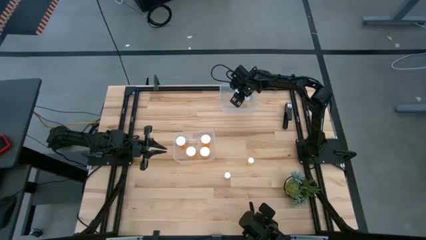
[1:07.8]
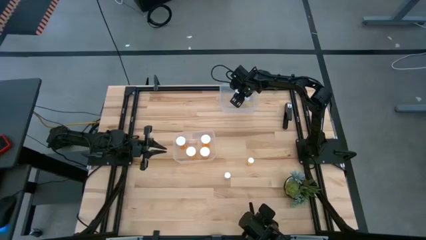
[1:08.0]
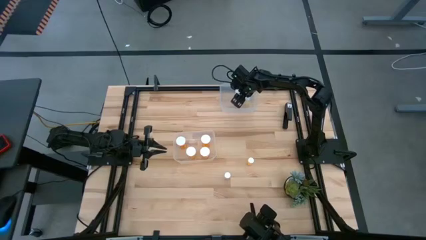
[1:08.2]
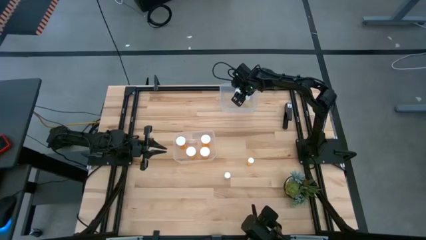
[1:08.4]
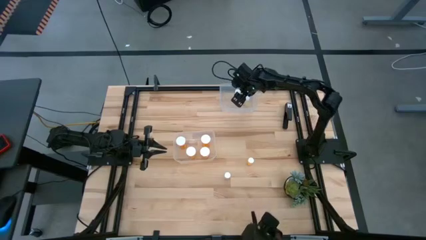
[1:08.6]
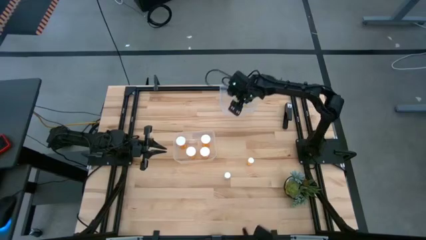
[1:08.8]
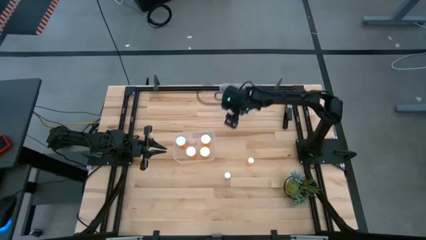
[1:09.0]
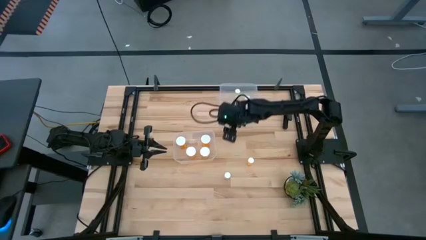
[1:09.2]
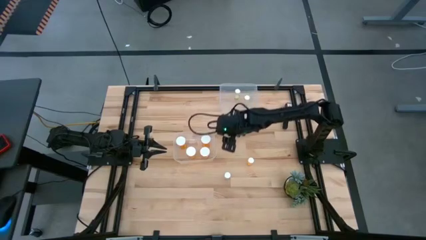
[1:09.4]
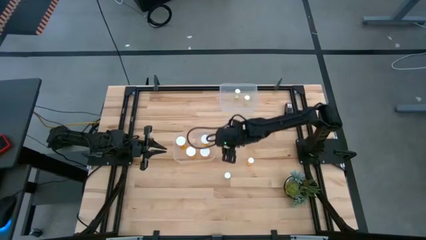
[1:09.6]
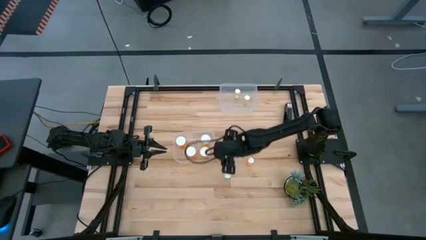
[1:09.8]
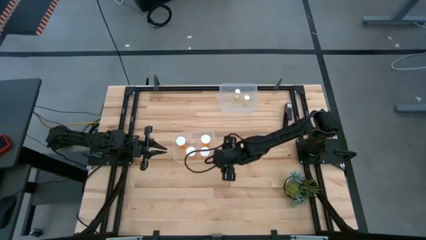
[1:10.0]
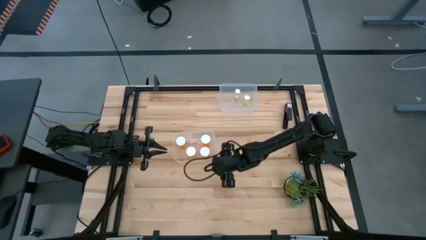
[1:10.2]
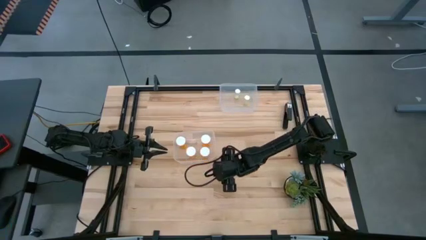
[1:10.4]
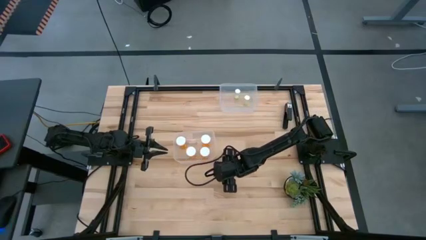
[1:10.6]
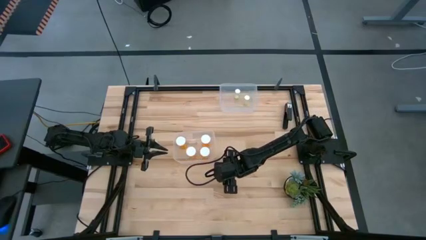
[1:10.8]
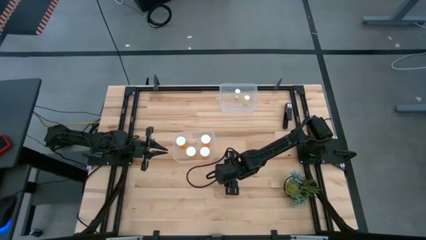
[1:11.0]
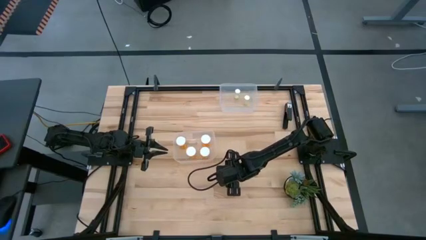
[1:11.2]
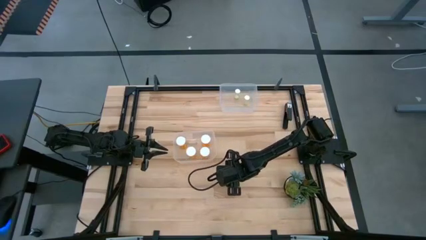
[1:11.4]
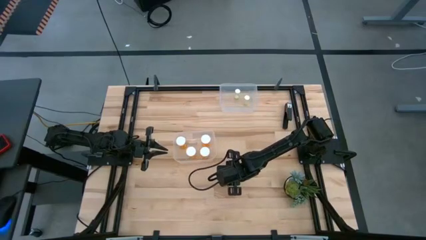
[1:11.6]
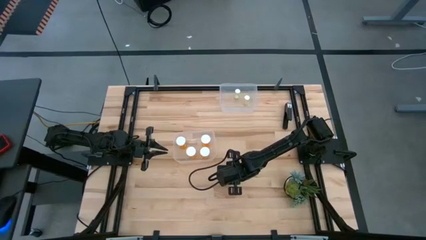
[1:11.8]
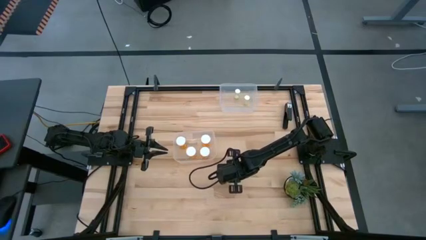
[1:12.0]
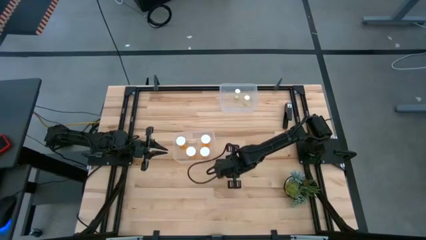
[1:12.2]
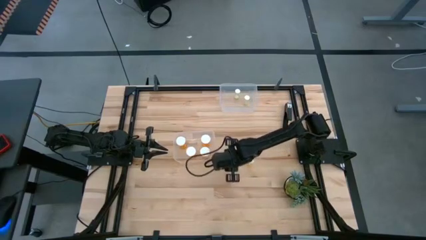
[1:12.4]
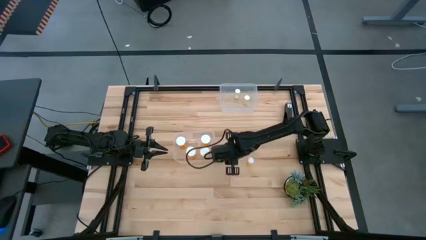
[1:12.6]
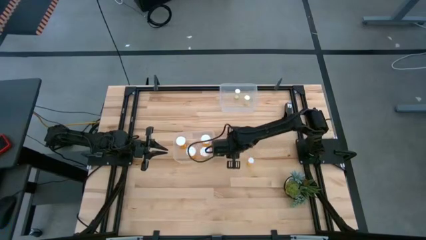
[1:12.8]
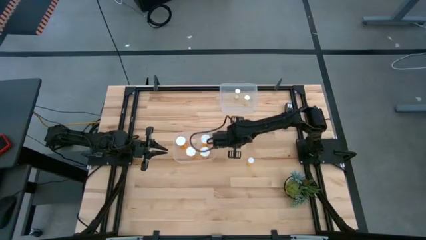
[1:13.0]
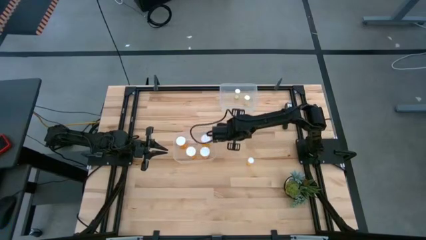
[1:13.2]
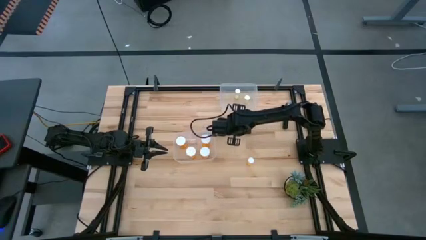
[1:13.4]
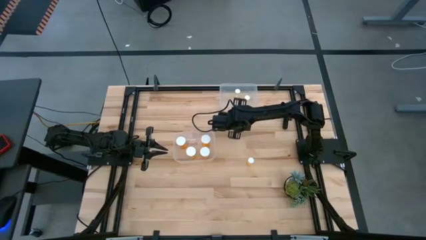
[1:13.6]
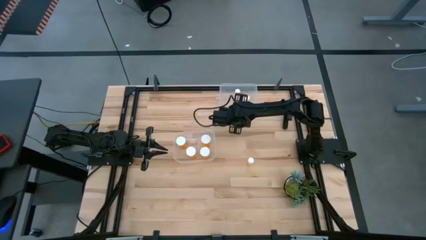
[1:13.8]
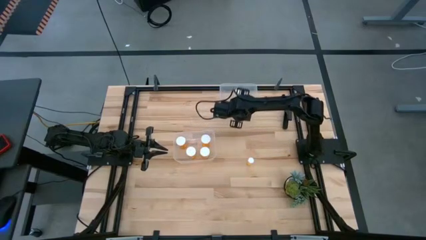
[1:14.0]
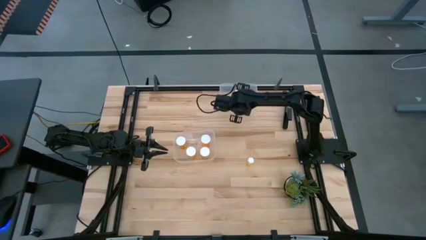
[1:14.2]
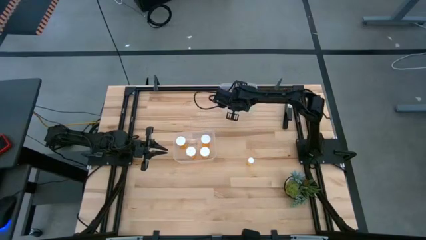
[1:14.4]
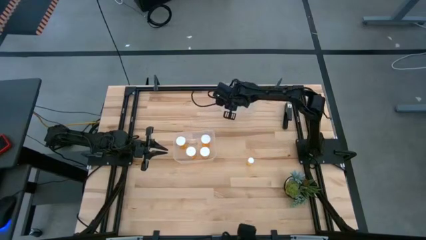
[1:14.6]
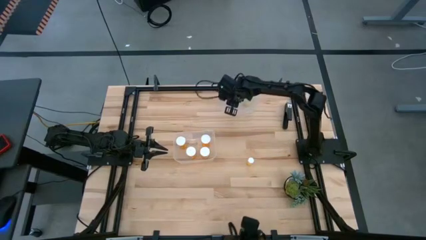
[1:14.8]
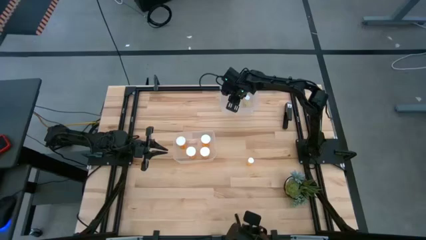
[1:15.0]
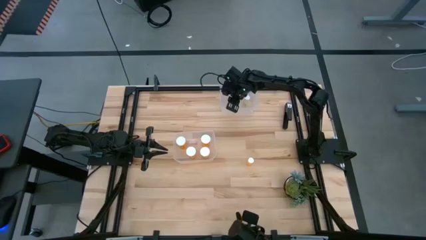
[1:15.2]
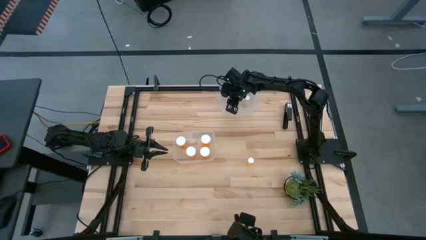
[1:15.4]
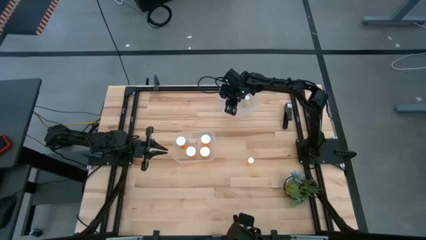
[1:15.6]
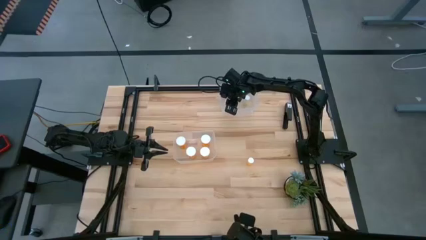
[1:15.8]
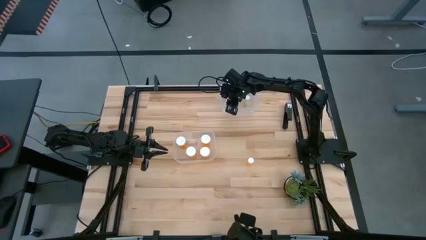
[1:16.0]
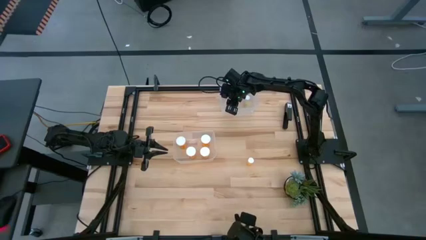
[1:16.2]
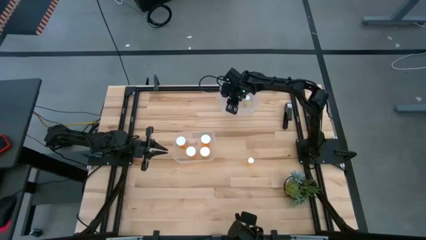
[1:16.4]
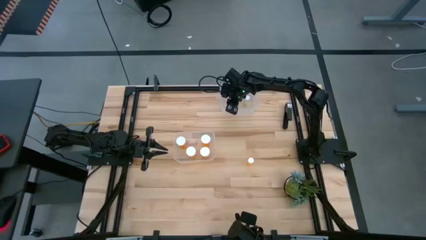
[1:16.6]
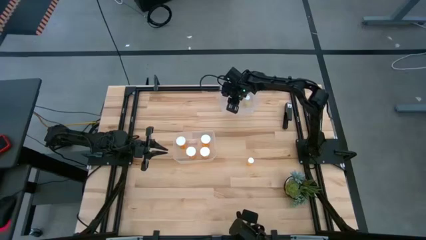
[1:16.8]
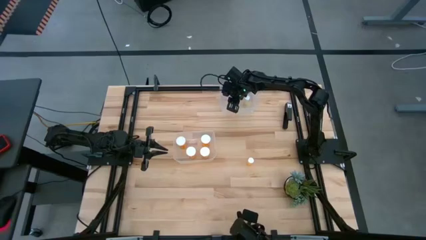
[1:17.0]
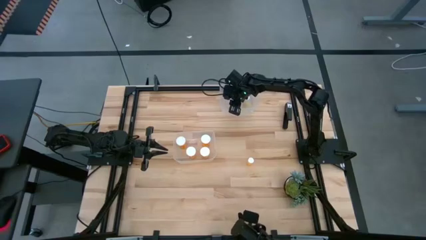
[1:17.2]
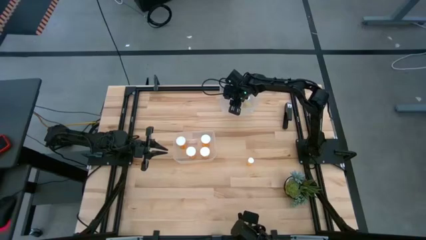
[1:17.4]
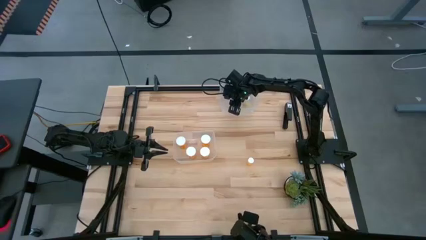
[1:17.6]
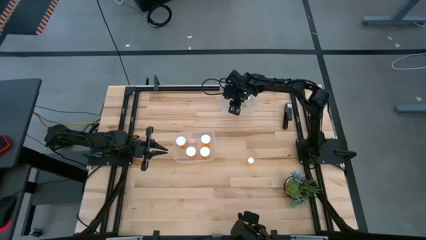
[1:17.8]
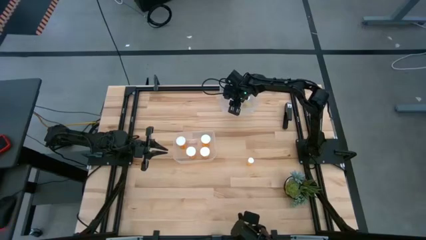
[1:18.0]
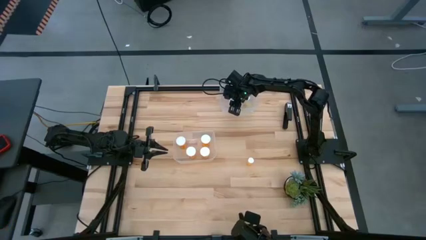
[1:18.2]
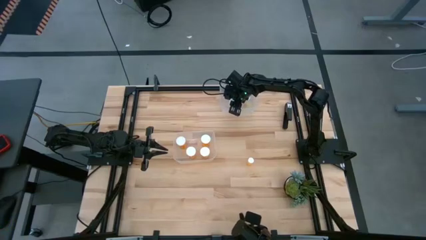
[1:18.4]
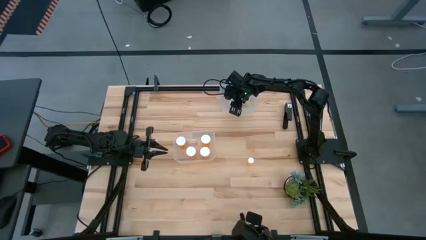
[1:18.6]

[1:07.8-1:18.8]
Task: Pick and place medicine bottles into bin by pill shape (circle, oval)
Put the small yellow pill bottle into the top transparent bin
